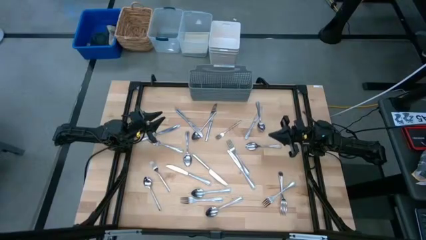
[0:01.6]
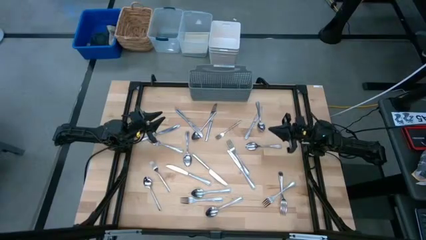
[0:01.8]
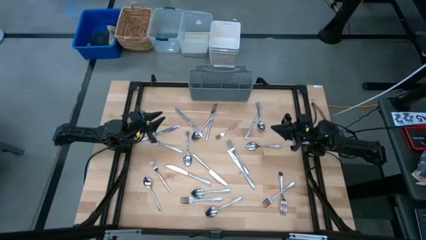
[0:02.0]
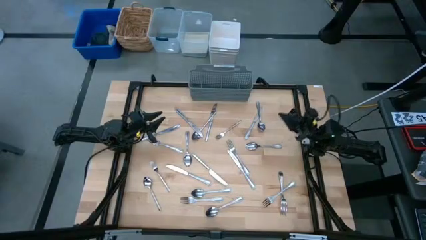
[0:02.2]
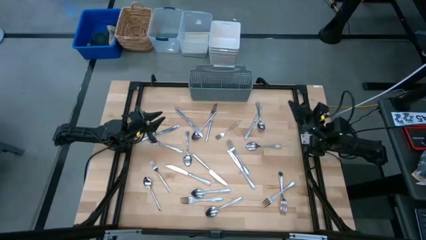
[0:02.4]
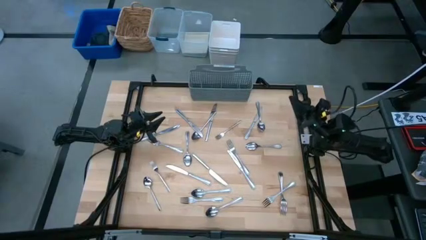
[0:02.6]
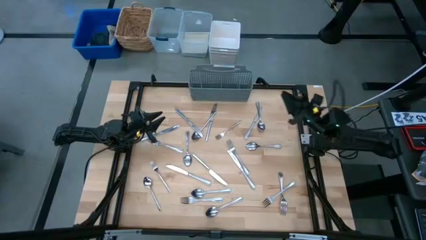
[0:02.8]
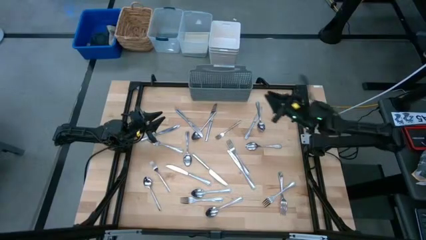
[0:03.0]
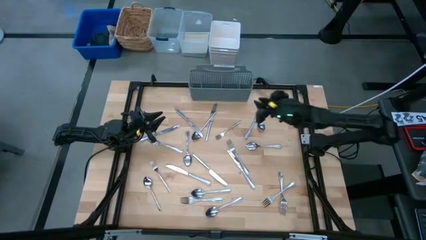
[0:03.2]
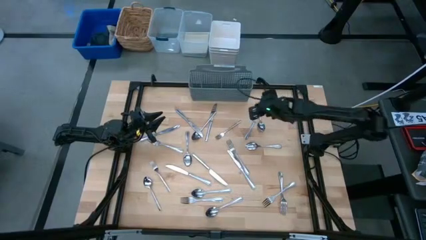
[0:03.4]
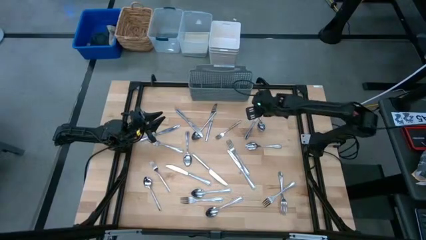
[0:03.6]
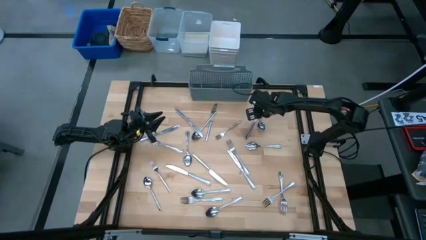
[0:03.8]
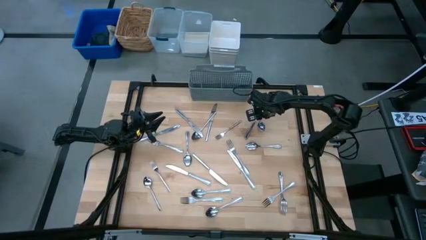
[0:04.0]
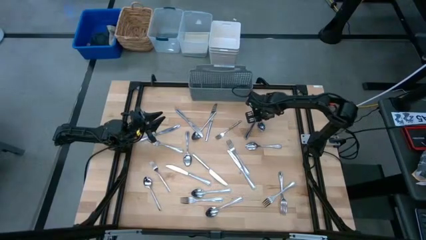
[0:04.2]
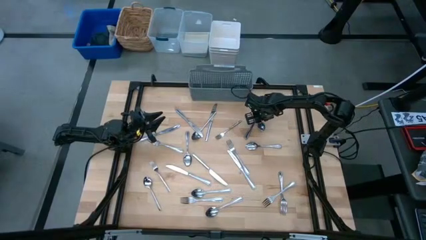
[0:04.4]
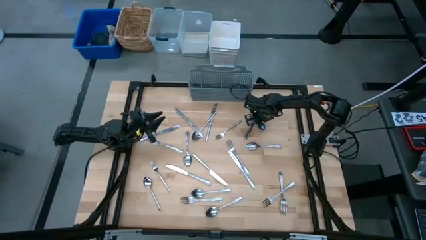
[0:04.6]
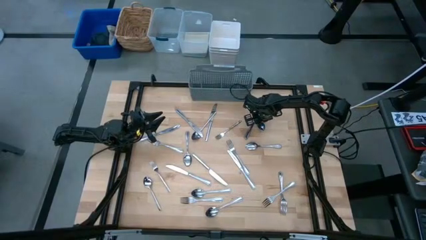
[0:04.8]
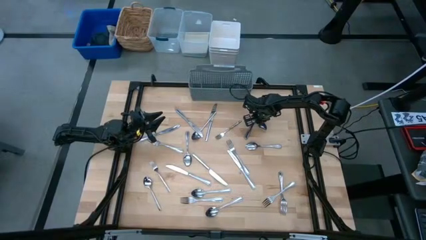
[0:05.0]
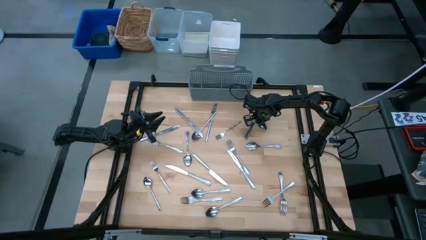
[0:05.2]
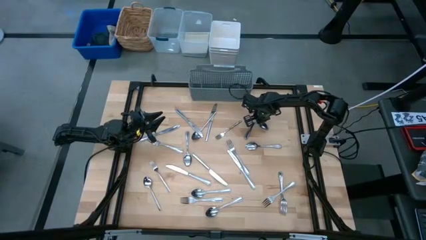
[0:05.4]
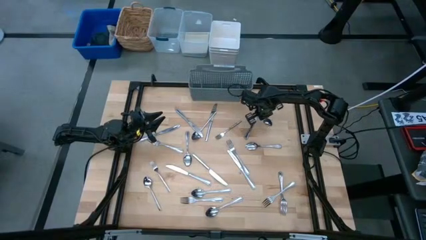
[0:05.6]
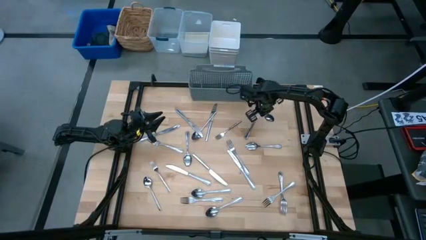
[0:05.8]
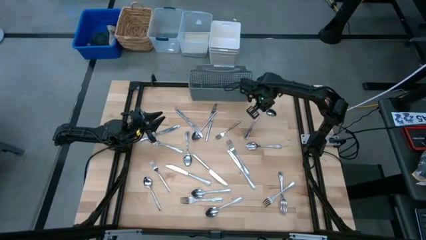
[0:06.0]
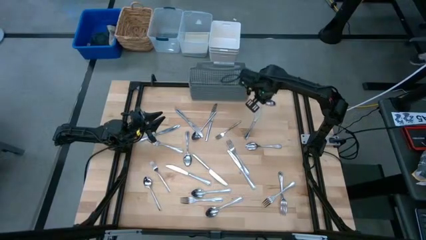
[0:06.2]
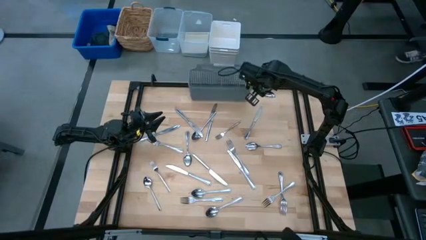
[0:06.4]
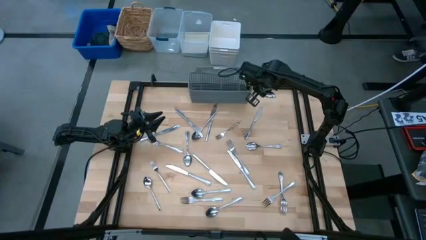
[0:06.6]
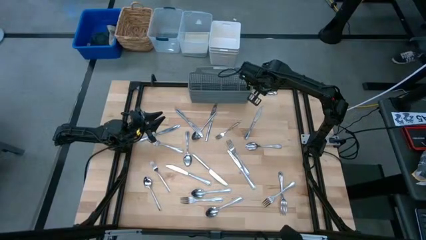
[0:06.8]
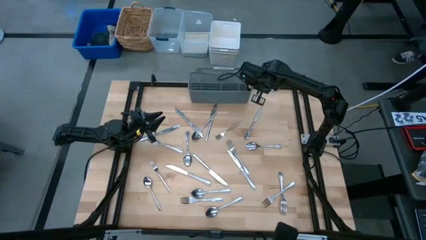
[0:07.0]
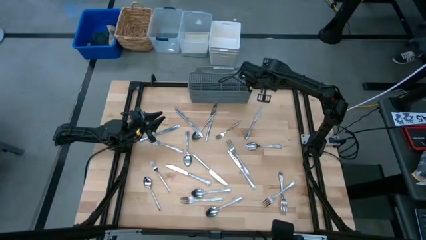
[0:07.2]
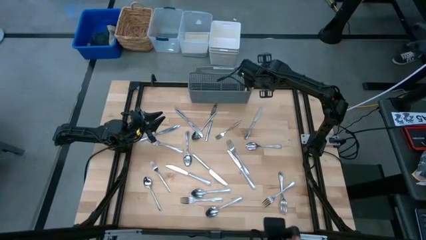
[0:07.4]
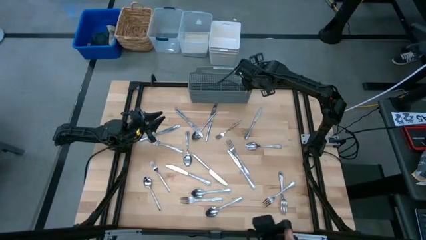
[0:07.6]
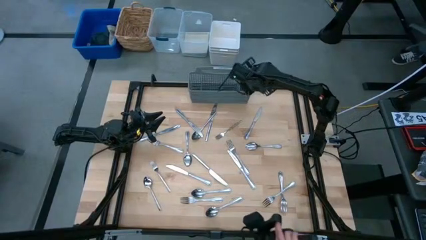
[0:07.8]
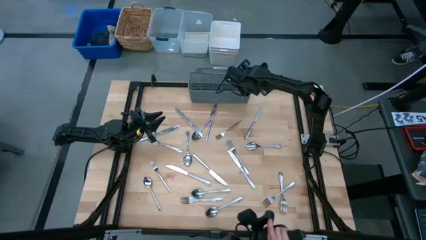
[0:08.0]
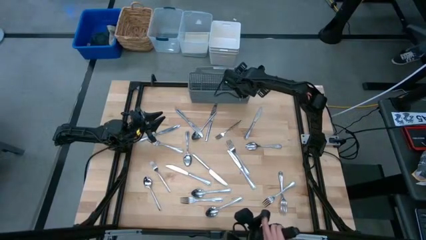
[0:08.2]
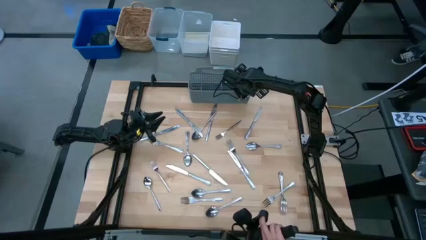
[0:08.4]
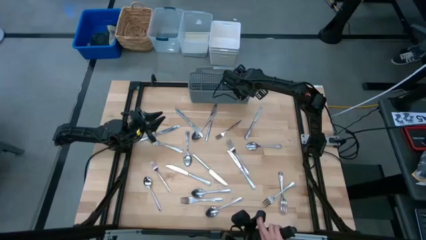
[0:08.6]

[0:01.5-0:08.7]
Put the silver spoon into the dishwasher utensil holder

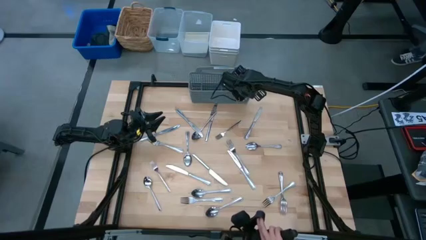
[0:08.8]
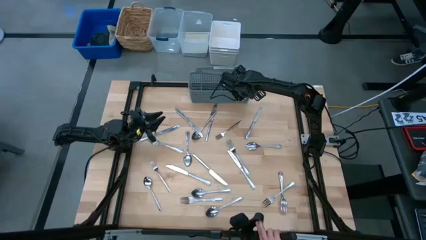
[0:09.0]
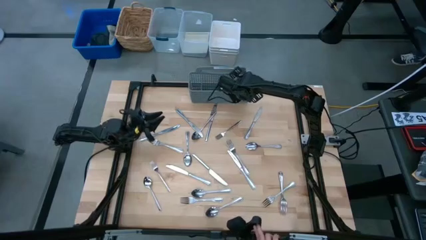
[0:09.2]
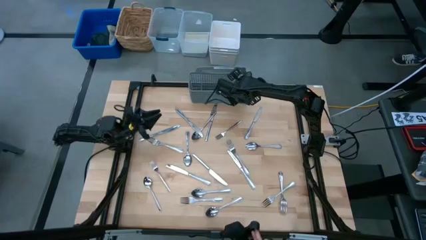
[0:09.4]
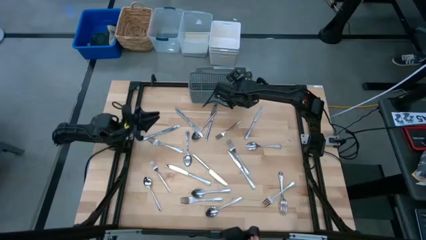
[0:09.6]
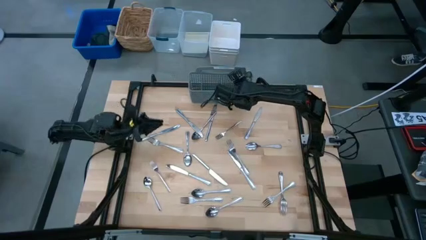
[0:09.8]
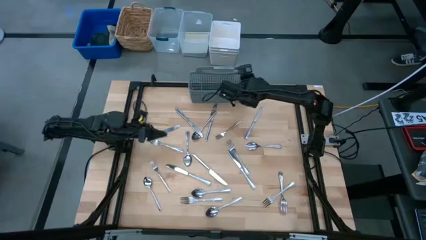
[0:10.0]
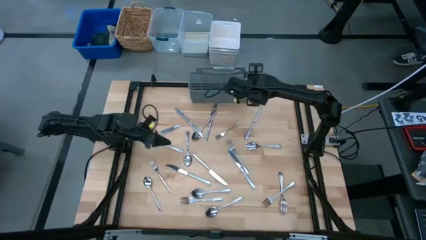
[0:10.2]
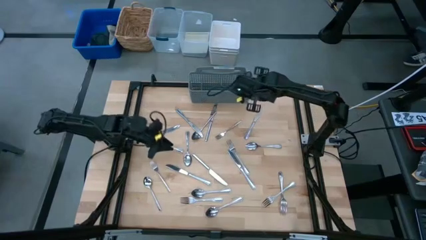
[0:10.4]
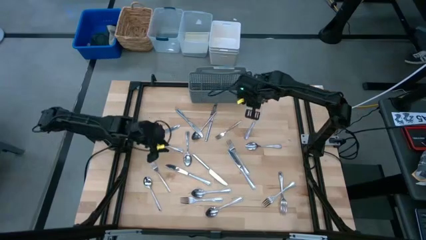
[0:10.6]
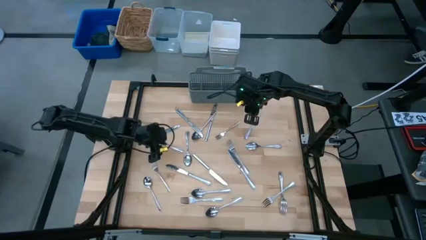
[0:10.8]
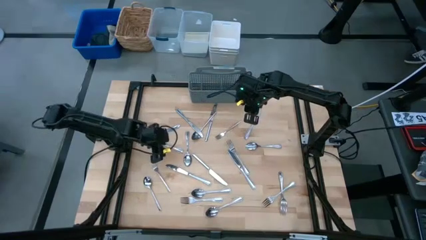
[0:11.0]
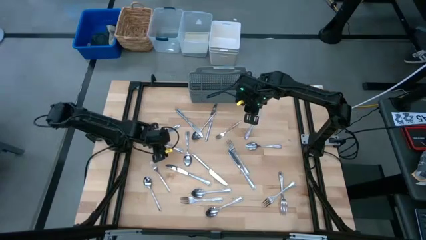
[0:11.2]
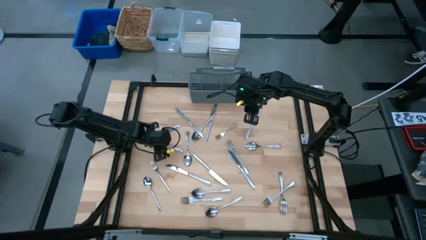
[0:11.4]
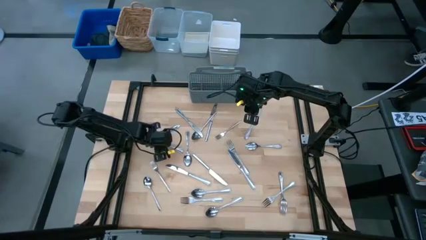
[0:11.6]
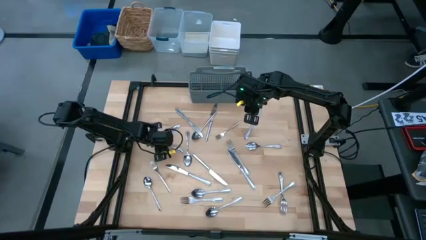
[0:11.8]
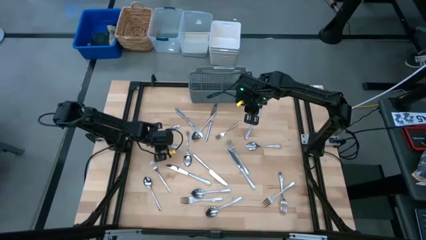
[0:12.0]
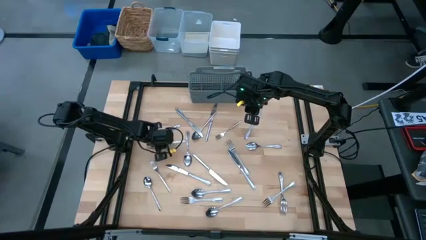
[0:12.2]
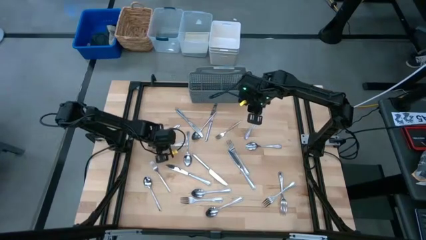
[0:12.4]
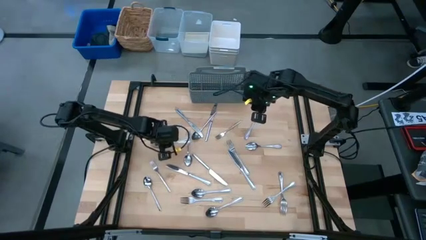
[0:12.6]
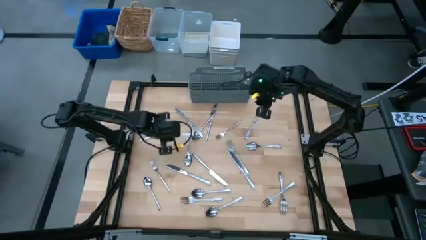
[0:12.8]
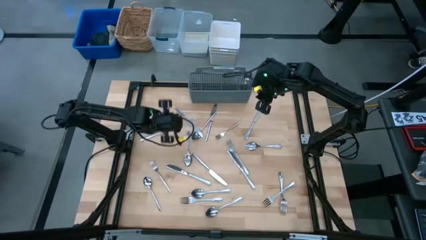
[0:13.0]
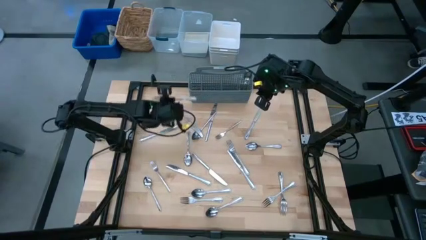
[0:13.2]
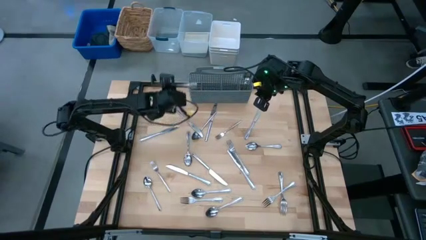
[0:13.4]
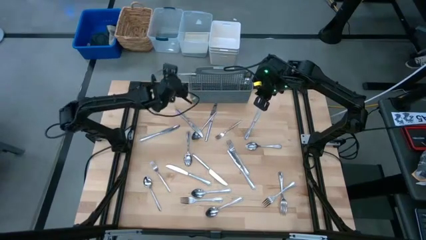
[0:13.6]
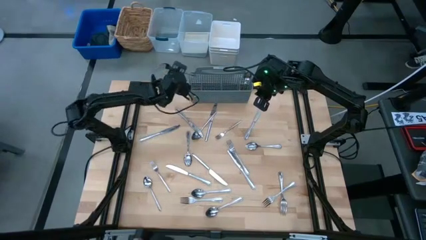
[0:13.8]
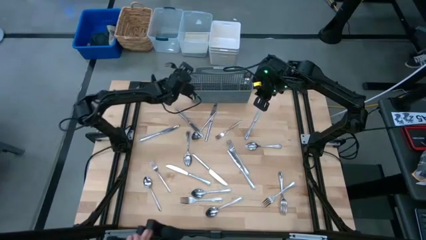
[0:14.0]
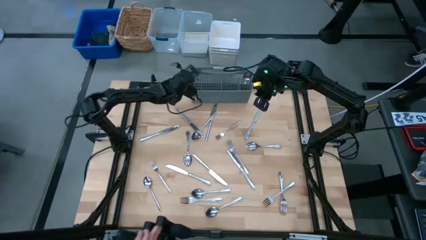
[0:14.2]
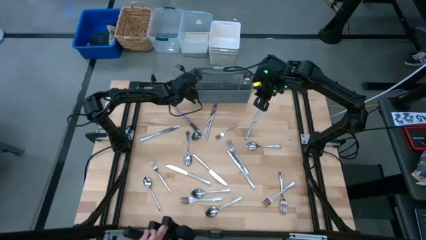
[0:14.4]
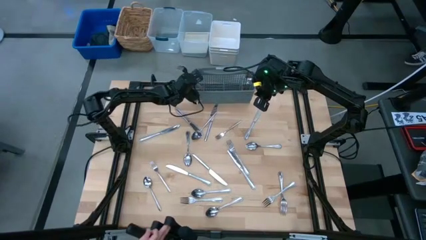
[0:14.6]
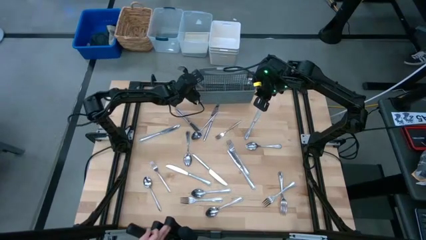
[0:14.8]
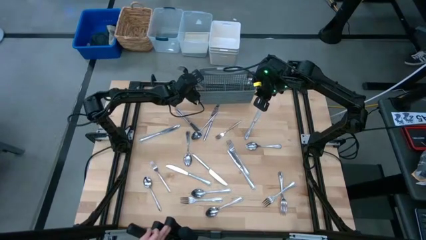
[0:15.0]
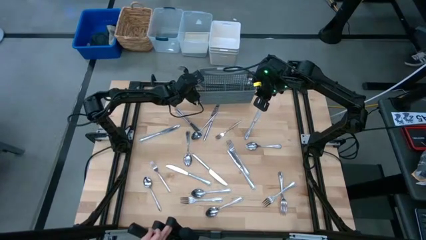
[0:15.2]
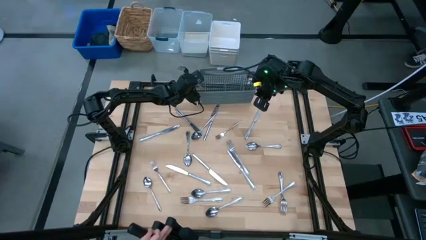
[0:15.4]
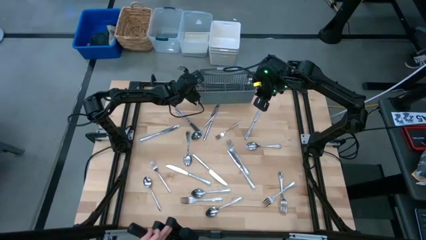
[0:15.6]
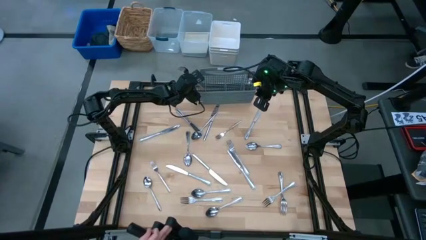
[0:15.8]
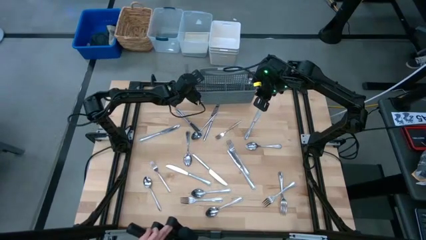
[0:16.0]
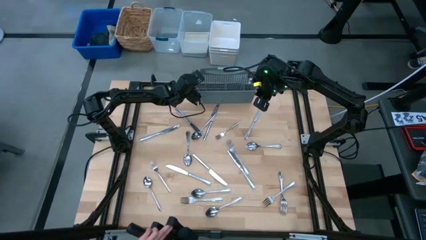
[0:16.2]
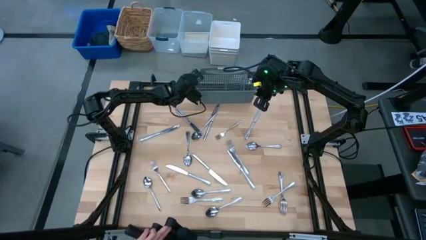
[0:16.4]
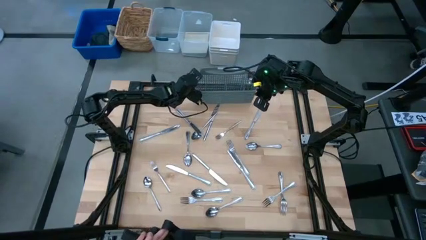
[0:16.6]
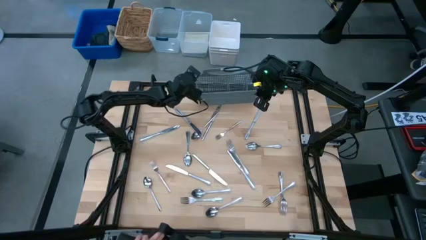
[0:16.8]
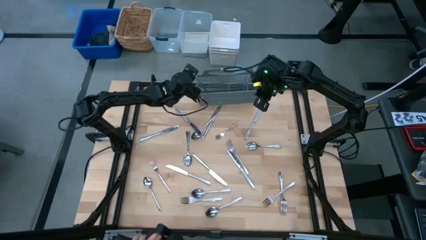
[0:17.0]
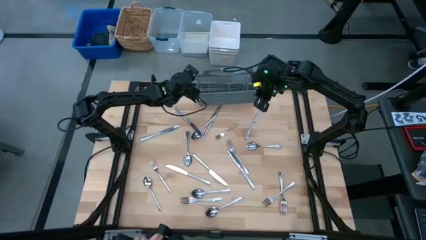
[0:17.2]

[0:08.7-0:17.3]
Put the silver fork into the dishwasher utensil holder
